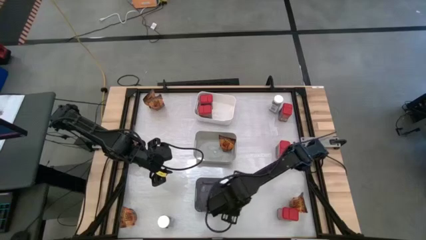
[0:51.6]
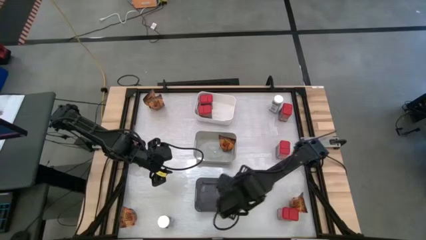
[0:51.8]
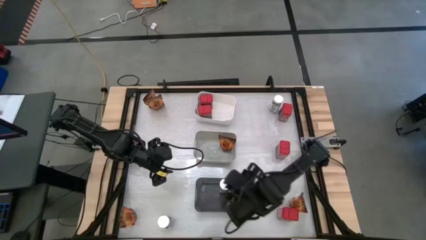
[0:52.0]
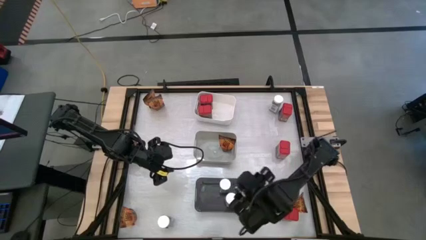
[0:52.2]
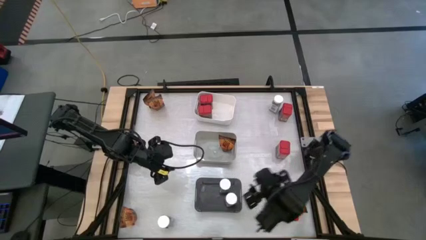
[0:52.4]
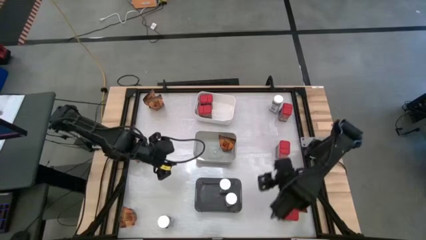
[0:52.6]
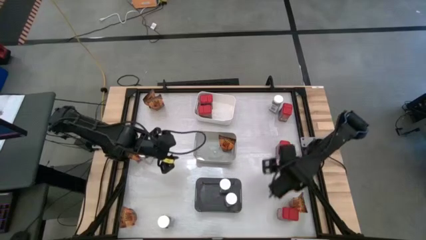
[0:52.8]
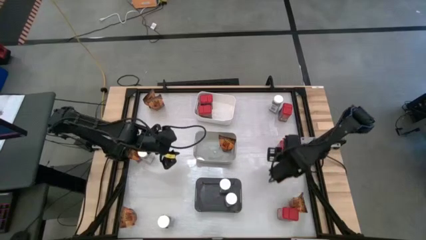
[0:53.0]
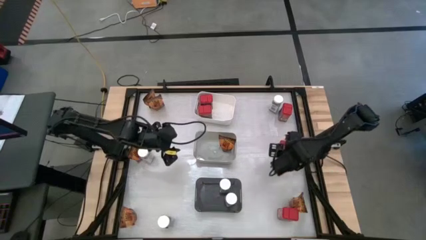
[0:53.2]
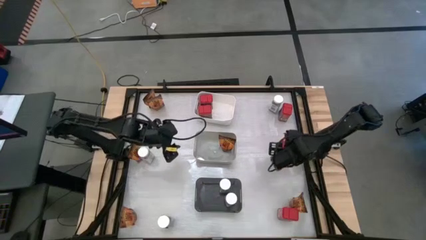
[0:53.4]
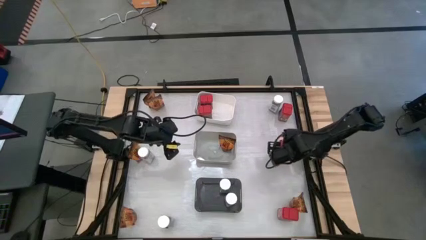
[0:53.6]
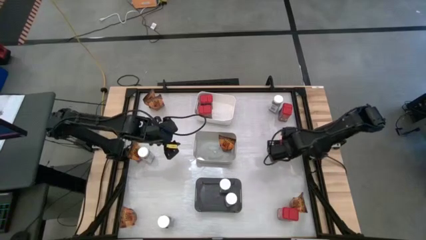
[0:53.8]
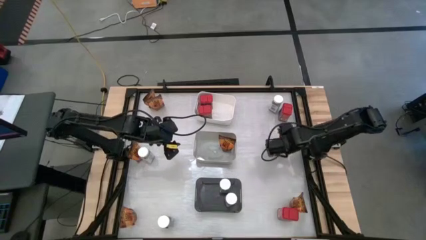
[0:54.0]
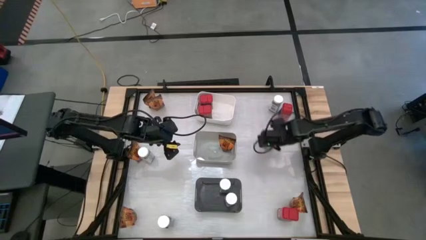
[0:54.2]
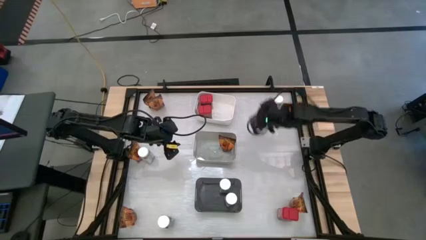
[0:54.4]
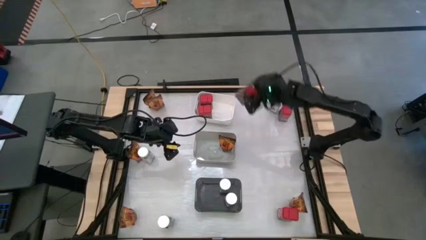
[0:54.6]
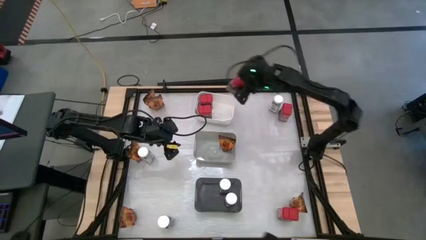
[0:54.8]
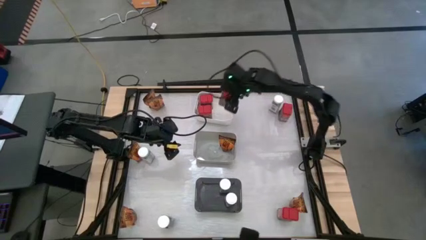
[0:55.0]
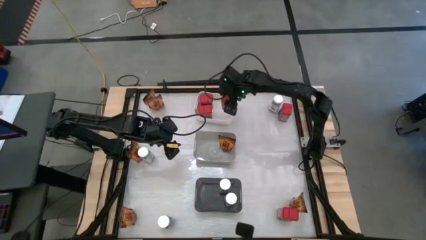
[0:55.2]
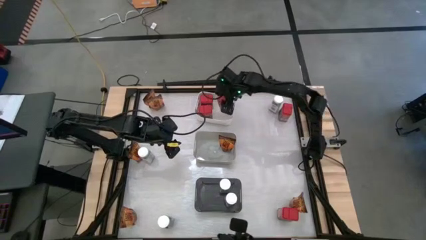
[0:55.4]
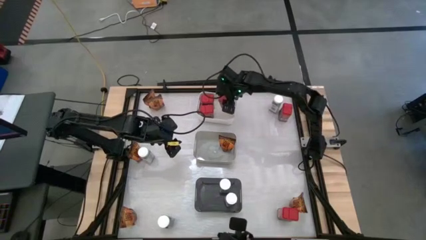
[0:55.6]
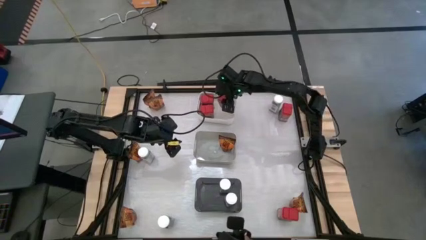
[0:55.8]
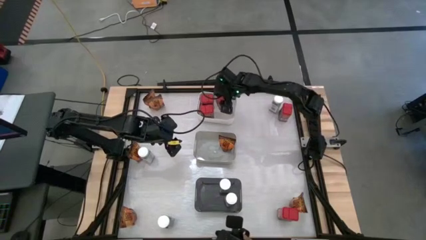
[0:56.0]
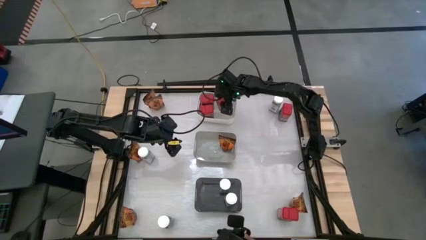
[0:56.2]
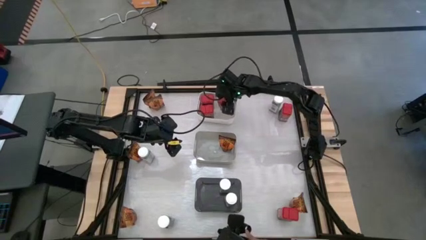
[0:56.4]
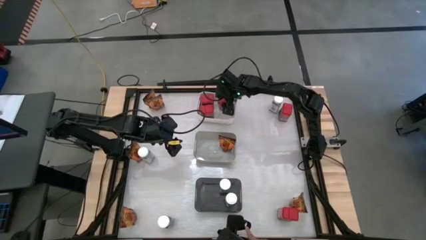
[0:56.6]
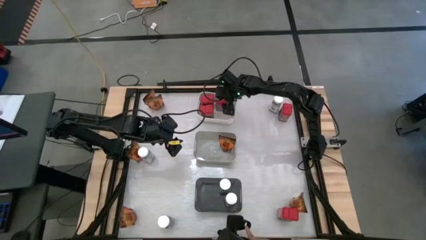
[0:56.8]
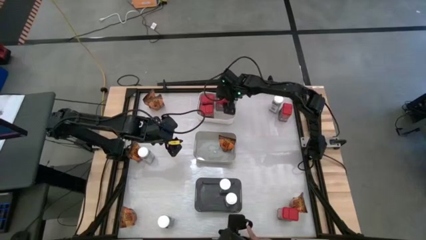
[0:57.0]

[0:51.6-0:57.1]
Task: Sort spices by type
Put the red seasoning can into the white bin

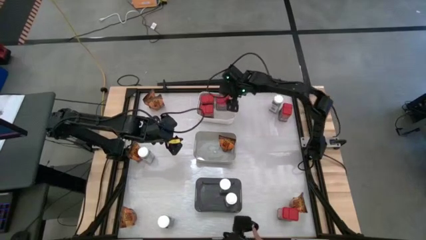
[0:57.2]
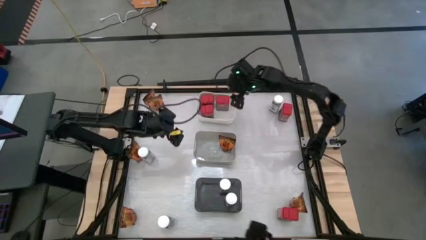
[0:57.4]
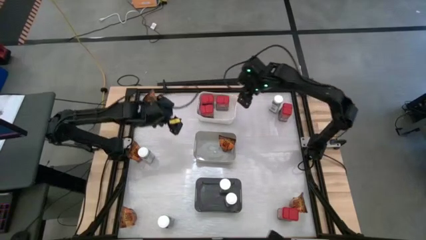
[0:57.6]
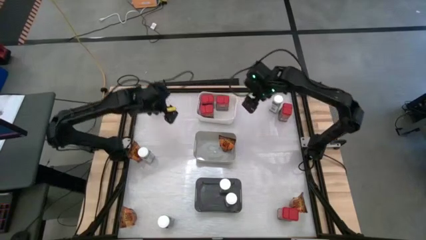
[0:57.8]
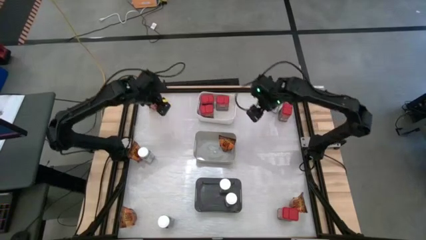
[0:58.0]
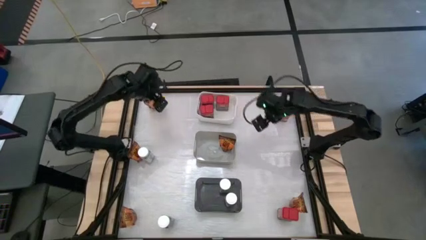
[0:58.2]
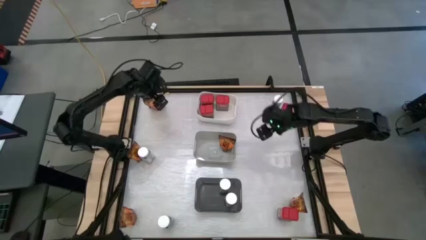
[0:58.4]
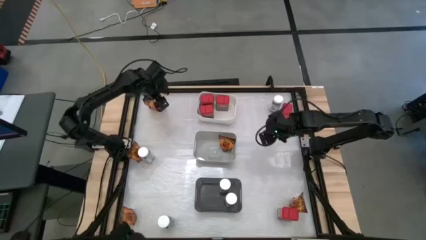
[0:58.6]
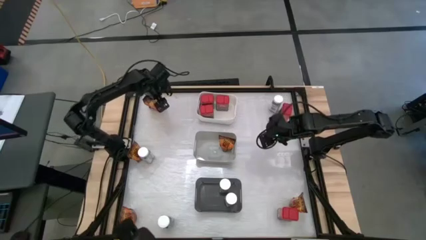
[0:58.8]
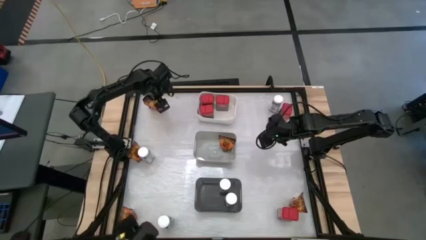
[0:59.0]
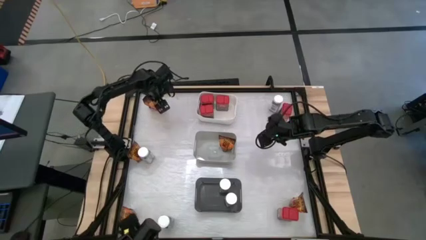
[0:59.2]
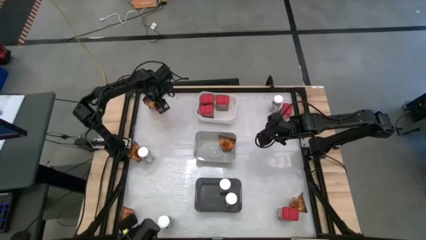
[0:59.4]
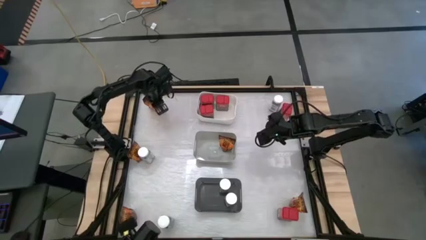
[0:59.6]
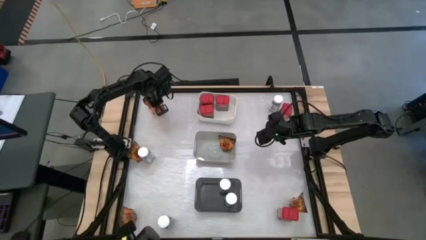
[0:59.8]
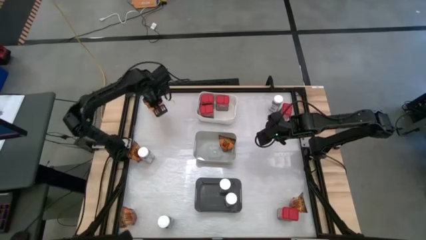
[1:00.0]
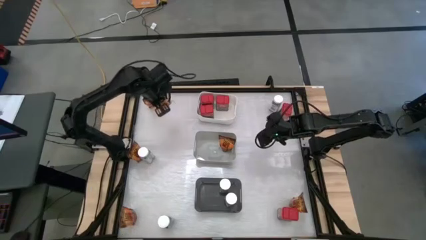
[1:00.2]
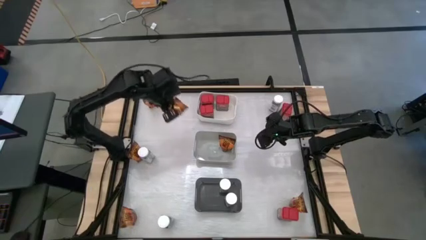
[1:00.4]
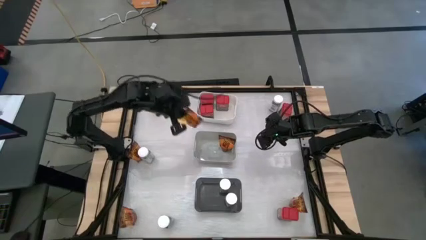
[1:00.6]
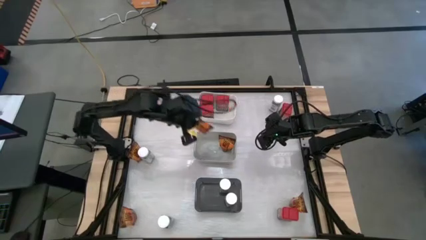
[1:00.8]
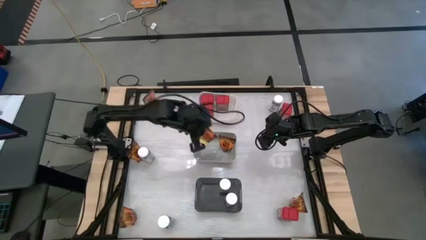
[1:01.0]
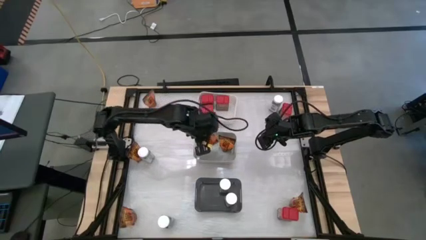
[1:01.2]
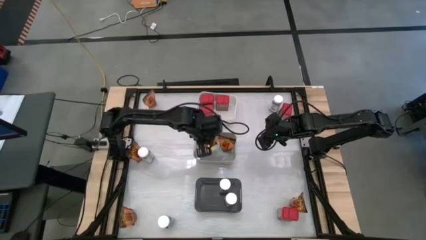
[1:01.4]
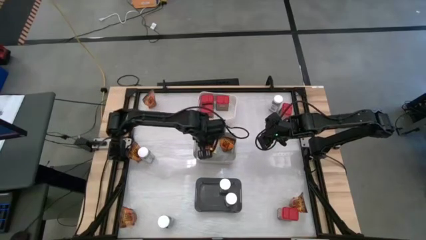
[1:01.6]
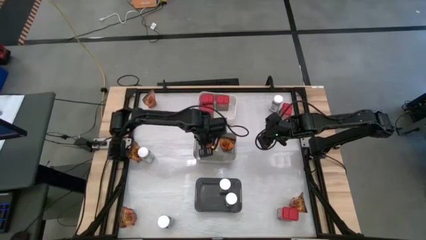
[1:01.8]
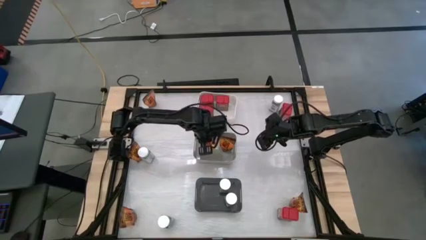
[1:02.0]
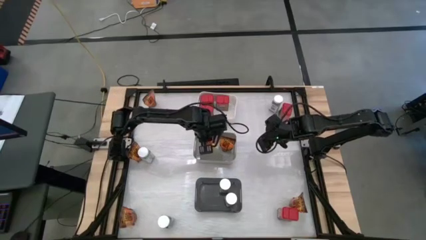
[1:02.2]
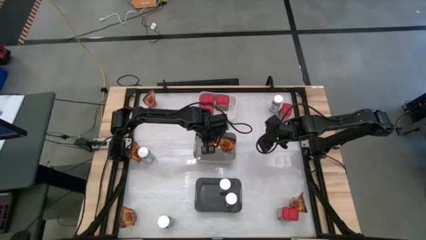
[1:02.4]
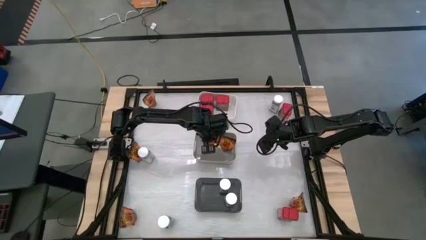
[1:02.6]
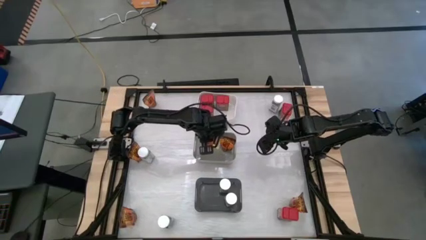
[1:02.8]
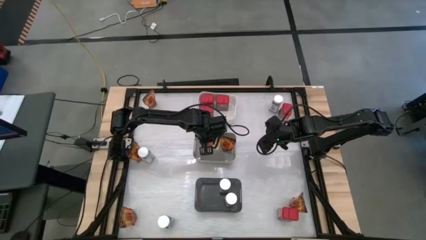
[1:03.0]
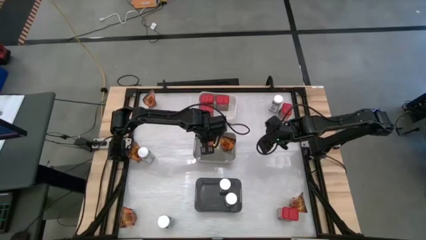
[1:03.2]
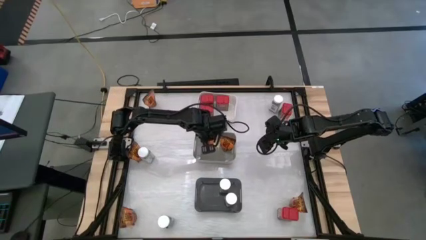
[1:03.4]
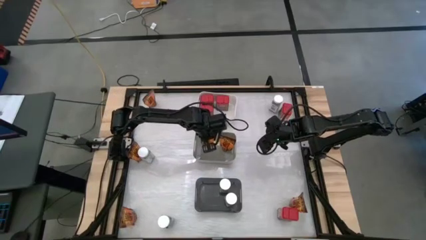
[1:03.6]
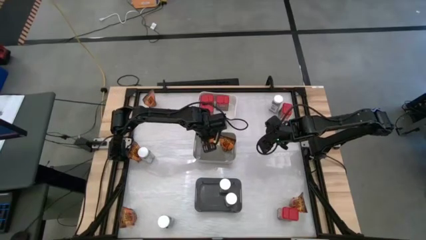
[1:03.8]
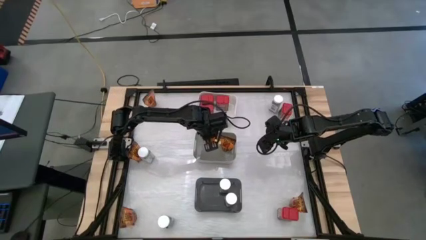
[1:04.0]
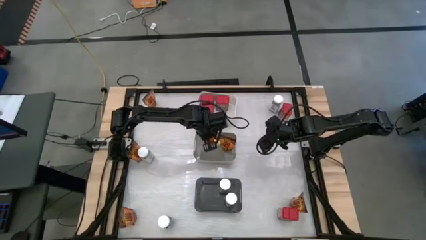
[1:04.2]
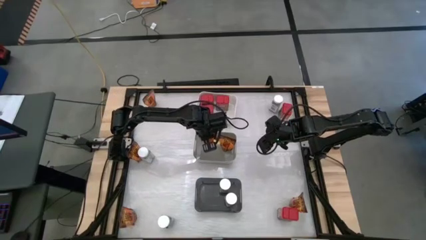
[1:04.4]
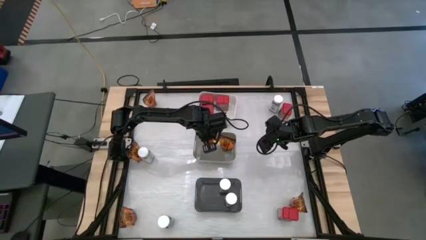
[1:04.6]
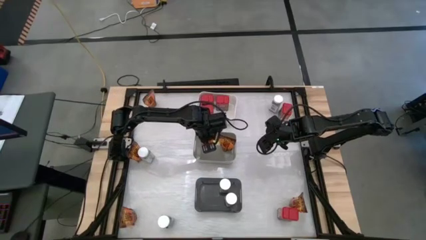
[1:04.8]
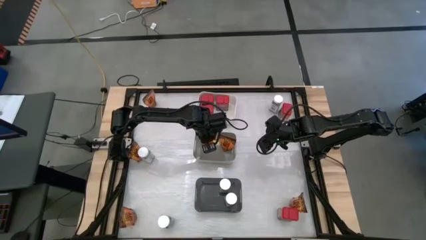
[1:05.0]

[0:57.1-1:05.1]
Put the orange seasoning bag into the gray bin
